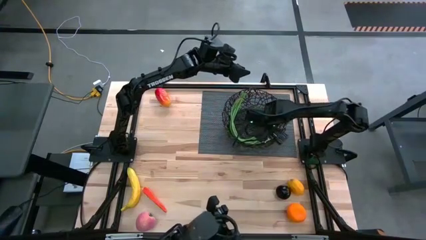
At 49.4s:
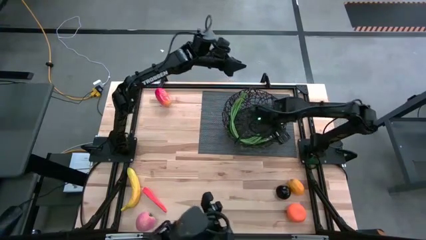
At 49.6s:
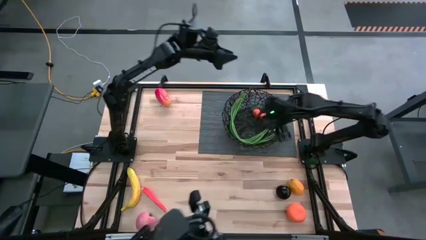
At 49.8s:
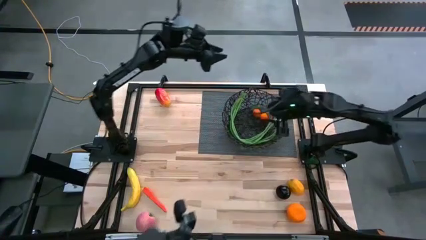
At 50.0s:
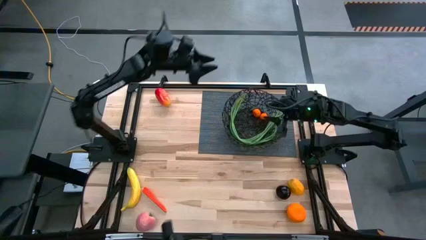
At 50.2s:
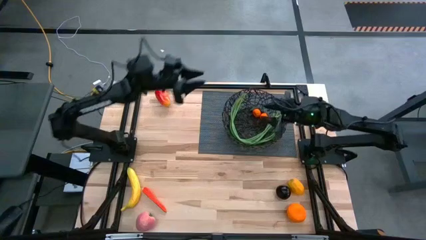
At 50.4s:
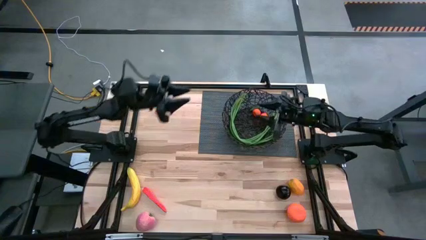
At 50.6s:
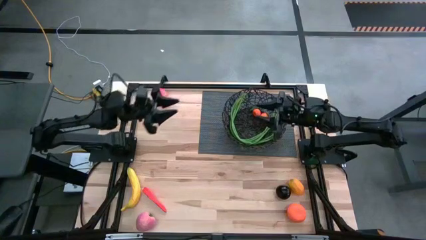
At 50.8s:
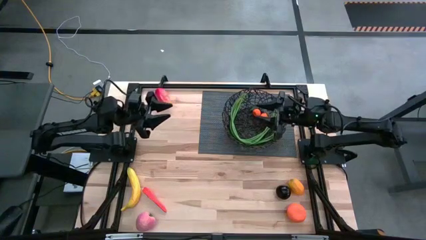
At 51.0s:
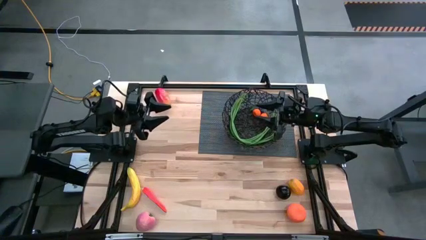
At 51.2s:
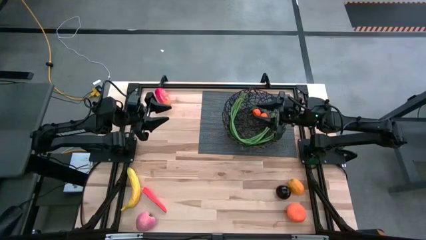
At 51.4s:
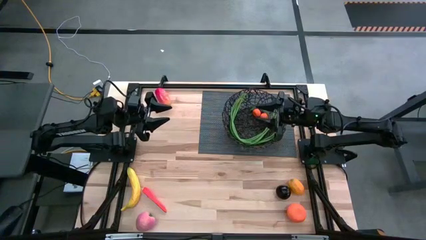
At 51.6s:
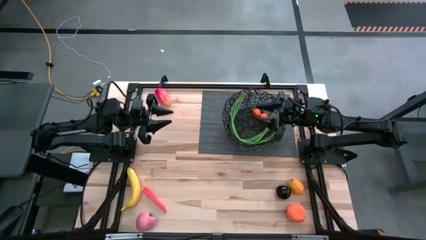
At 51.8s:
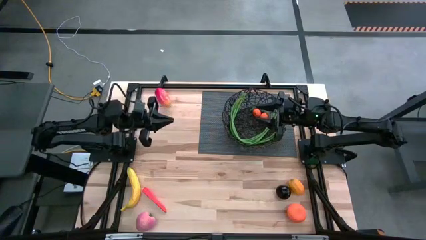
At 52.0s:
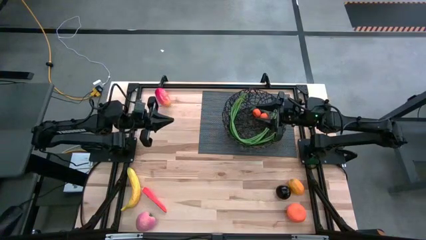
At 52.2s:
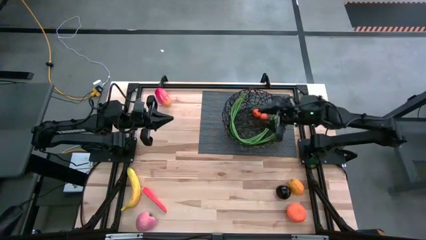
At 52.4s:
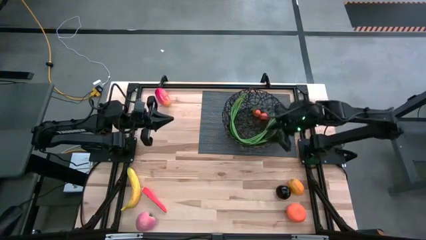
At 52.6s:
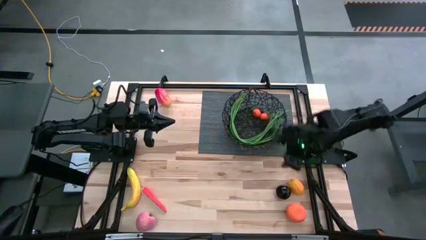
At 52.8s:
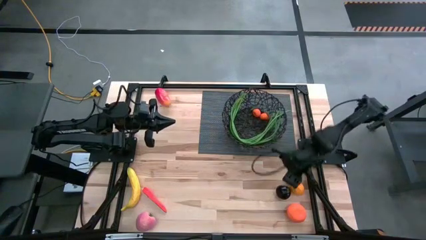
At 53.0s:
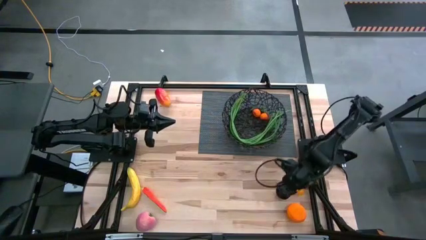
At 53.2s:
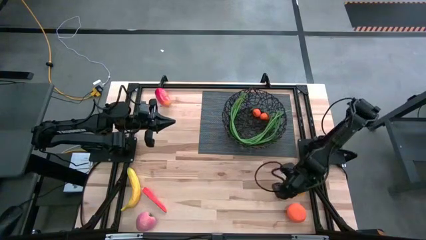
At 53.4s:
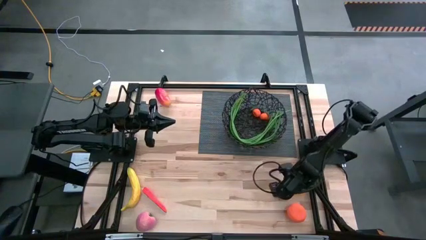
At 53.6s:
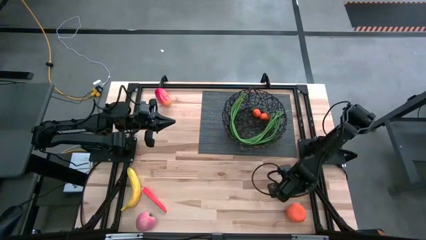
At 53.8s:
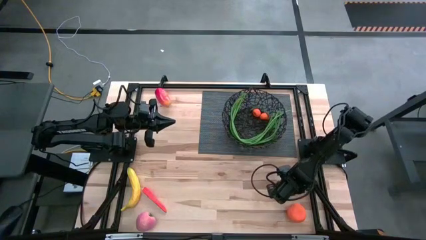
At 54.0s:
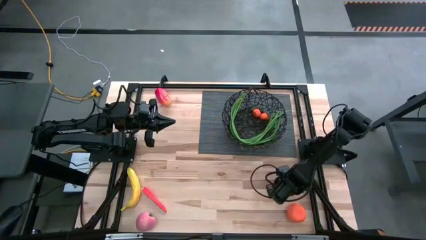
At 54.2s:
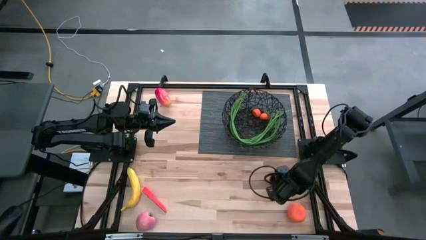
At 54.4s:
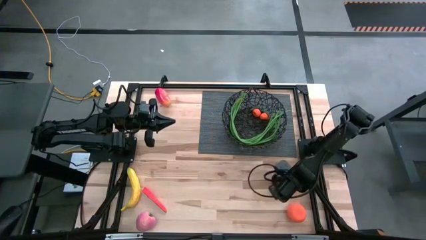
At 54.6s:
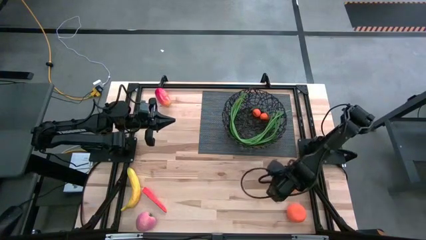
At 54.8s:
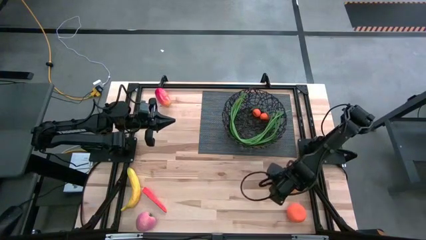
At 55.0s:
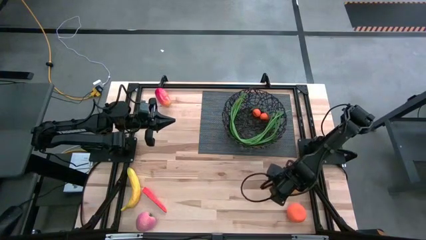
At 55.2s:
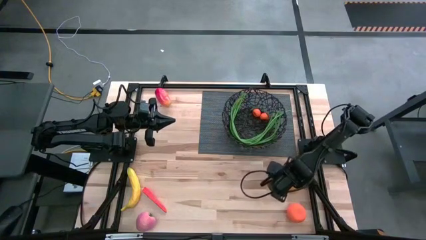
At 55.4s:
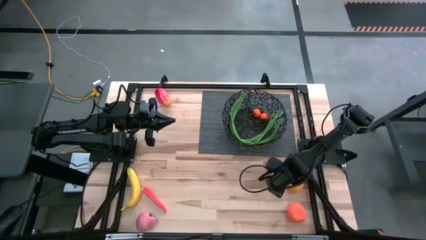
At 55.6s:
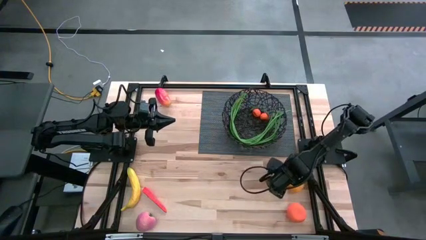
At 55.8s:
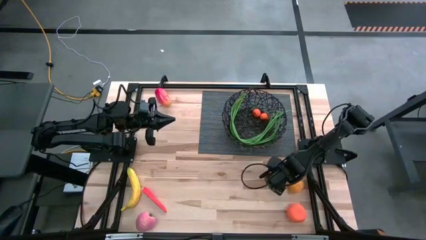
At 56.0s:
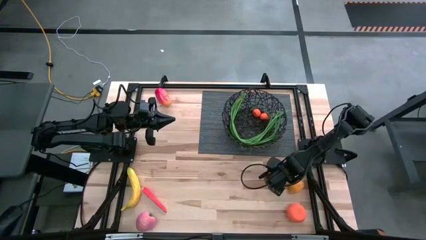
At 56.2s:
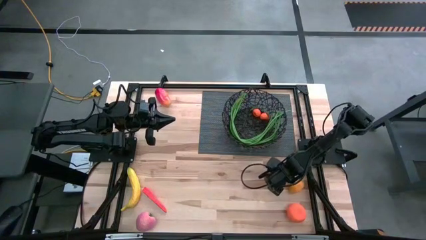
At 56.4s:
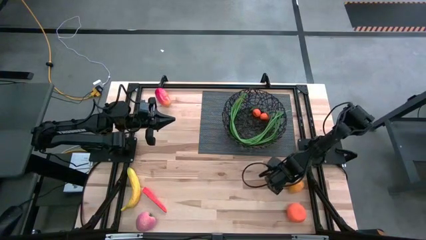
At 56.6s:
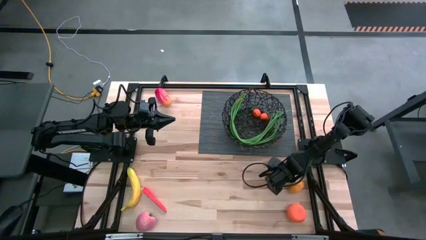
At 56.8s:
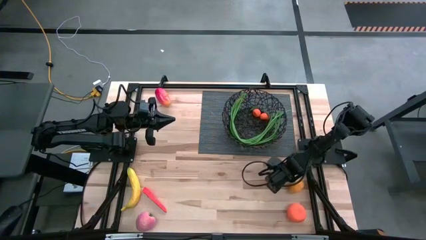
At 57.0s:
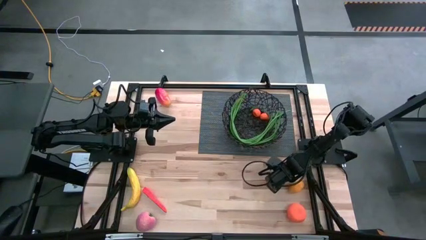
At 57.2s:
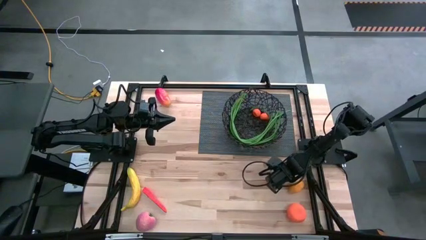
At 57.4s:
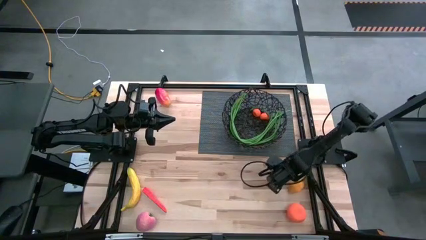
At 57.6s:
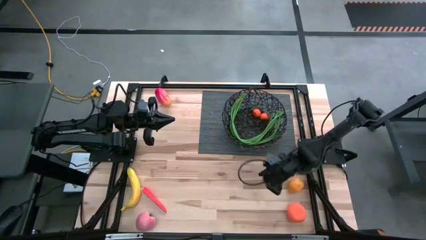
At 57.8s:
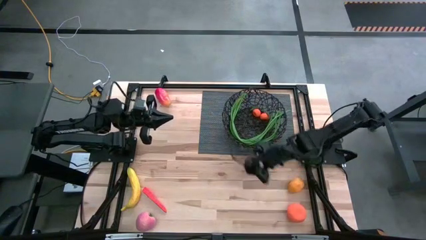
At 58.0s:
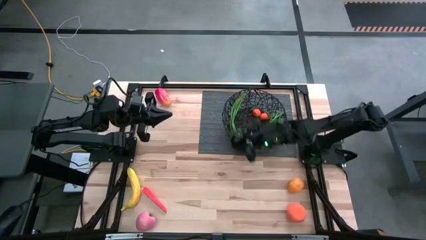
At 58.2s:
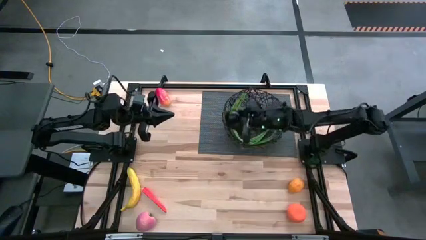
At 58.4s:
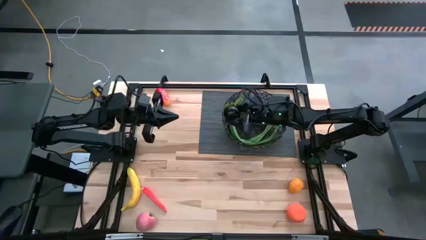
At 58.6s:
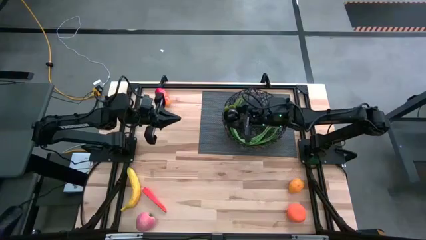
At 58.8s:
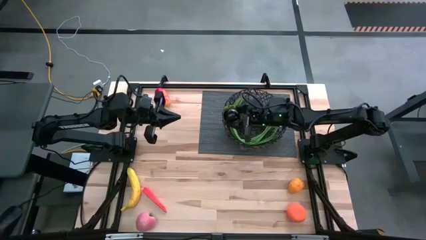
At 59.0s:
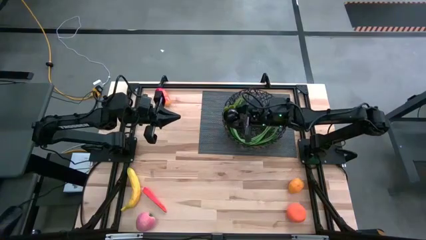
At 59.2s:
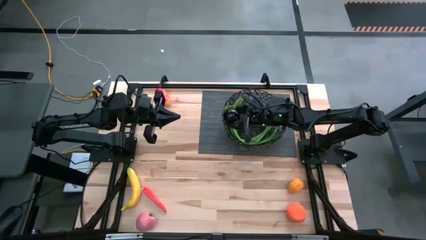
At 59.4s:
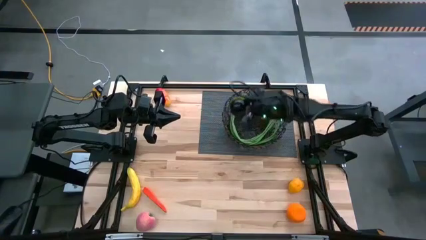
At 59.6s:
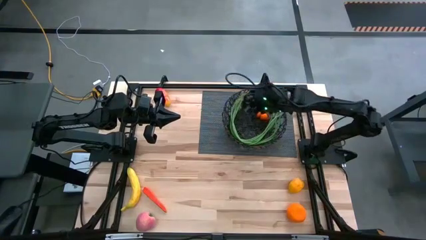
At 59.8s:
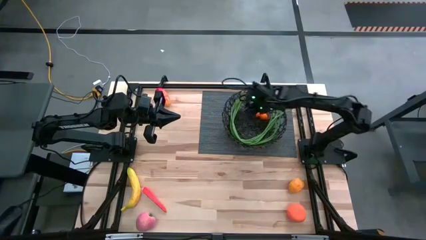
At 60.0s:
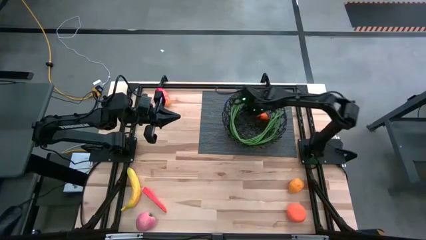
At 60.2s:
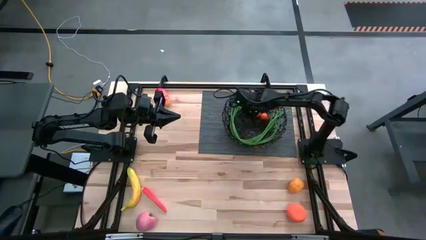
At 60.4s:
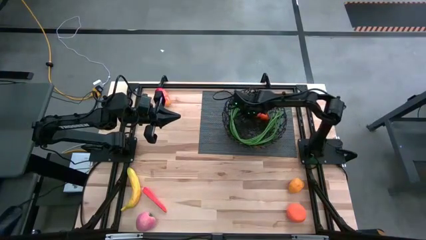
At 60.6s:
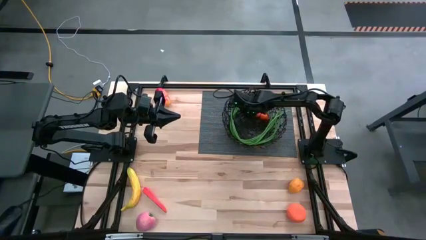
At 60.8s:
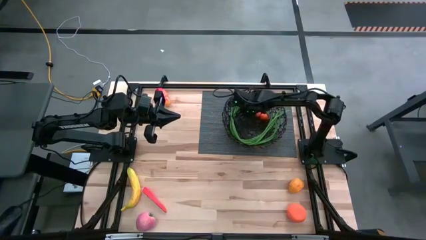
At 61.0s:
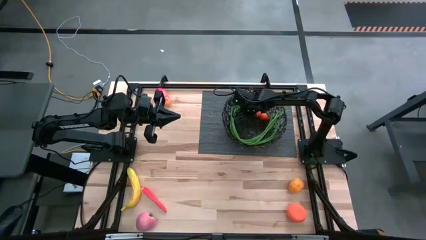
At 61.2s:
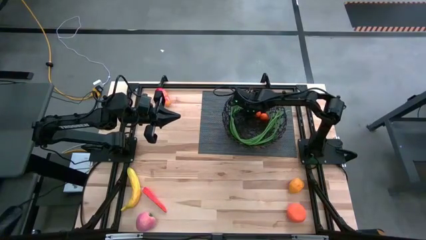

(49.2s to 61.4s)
Task: Build produce basket
Put the mangosteen into the wire basket

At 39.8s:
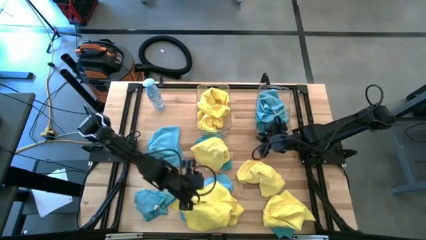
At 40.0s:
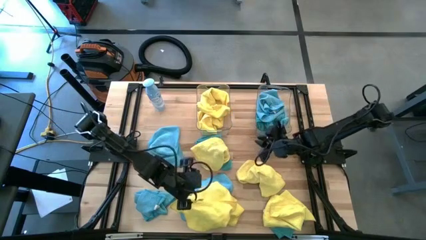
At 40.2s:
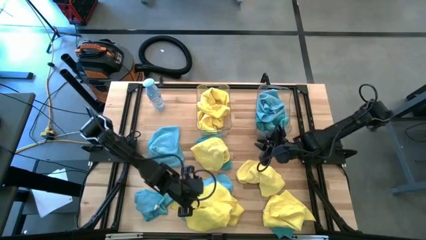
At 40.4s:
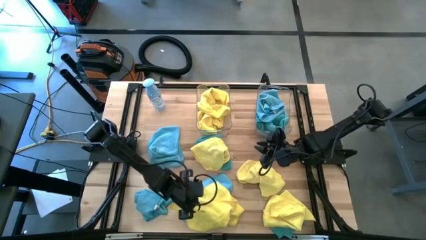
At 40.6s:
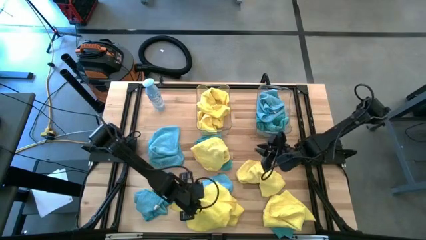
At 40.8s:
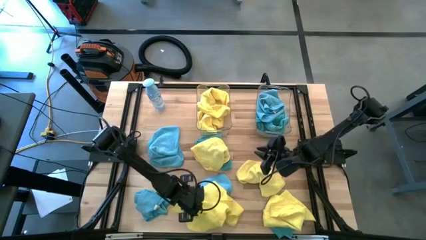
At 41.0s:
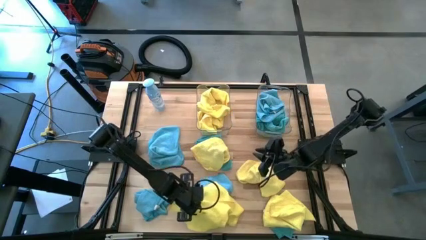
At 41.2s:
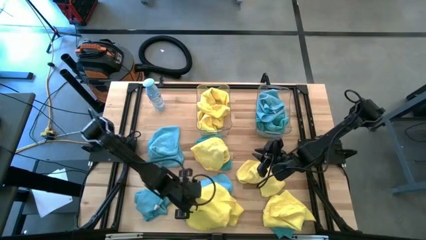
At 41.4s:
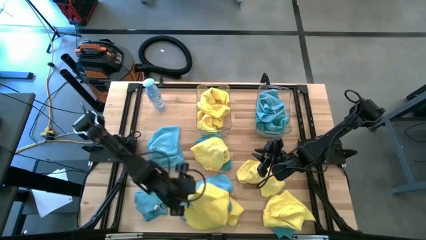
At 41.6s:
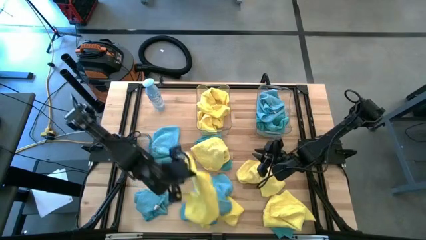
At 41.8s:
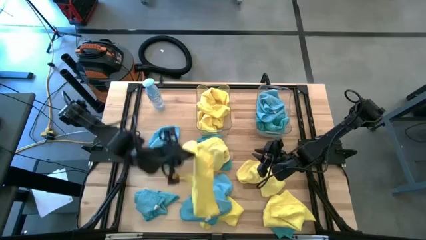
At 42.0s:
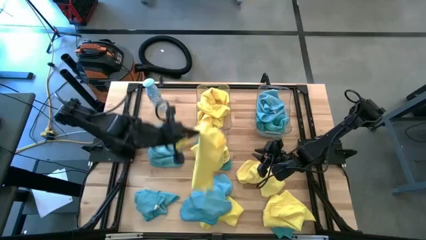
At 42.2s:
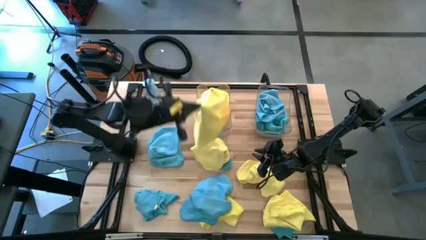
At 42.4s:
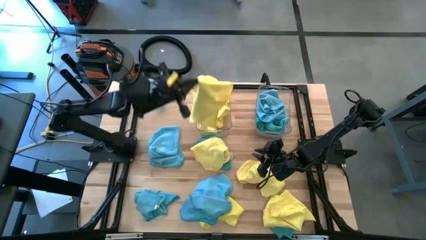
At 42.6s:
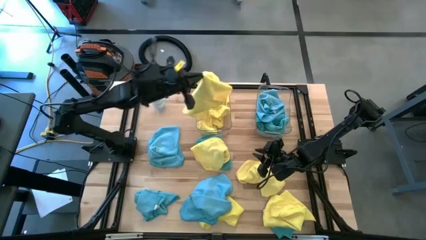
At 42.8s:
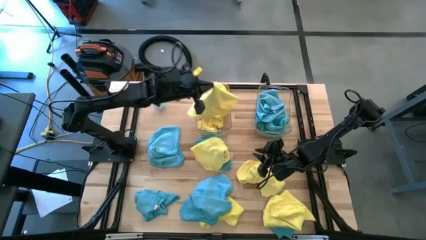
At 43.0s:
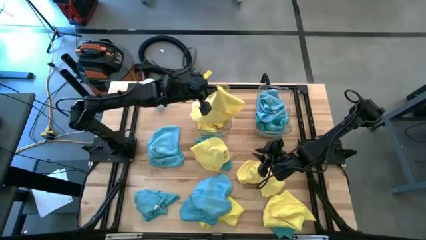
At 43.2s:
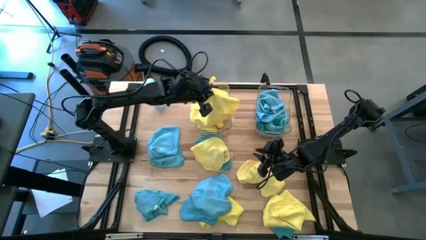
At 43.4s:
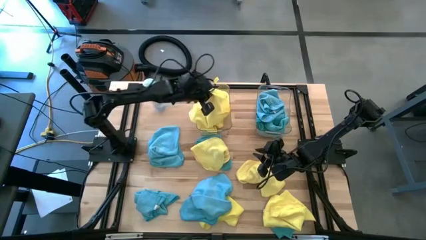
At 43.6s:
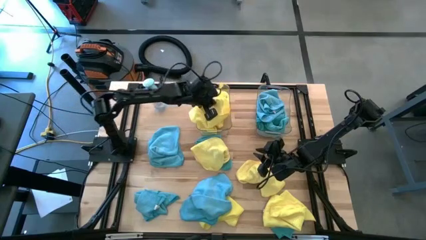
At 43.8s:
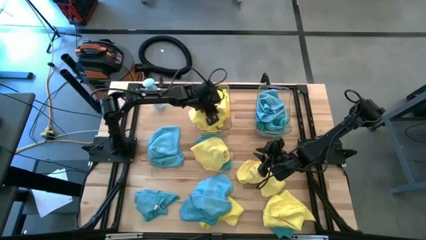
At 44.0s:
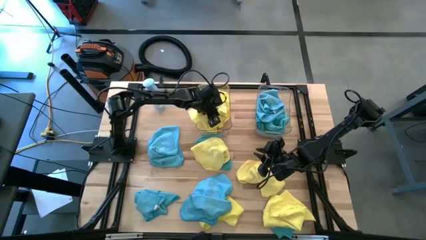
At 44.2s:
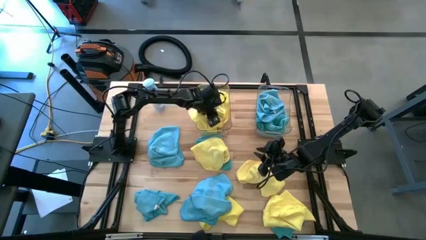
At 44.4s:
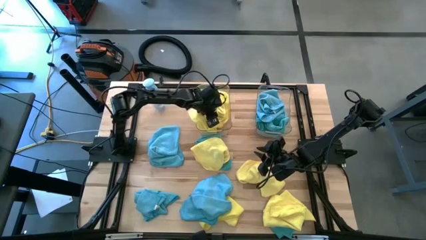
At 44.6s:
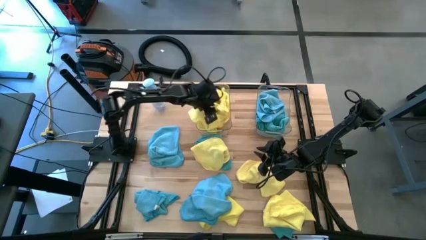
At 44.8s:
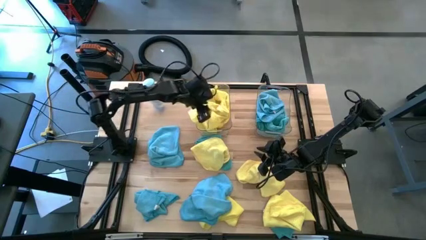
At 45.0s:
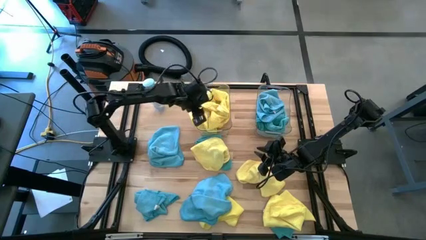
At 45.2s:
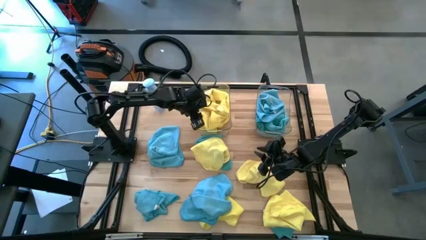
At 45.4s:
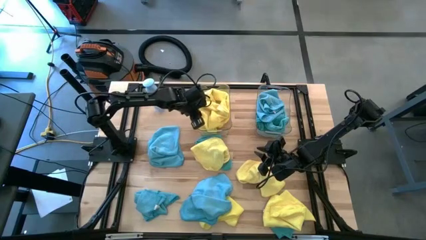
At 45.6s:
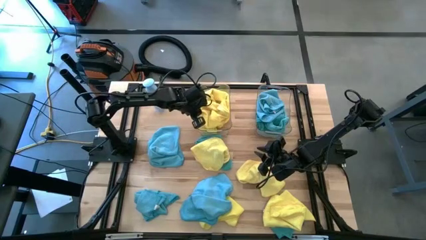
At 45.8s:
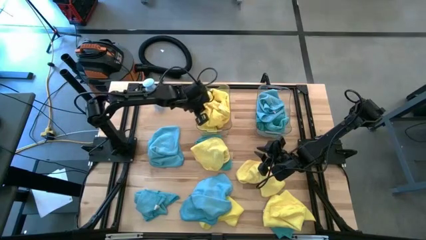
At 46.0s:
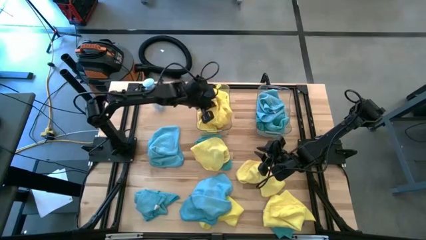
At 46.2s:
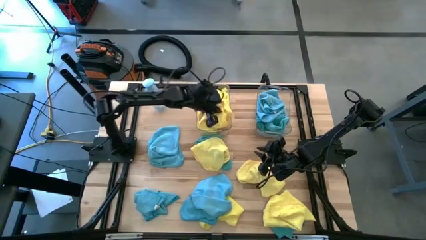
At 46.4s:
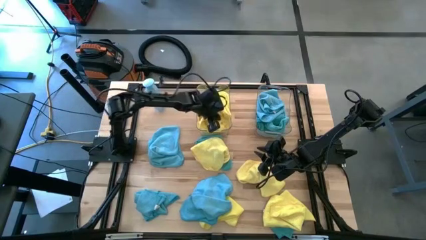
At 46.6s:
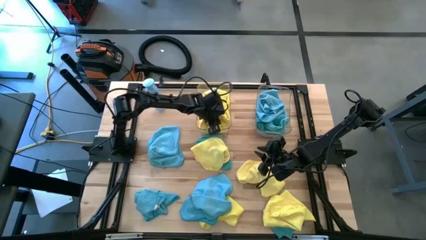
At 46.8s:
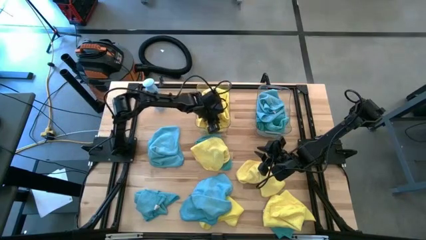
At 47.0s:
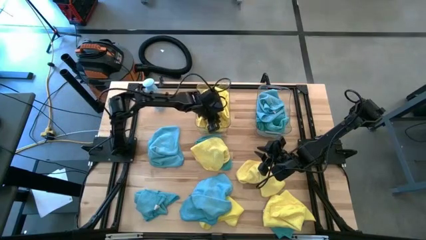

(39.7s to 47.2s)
Task: Sort microfiber towel by color & place in baskets
Put the yellow towel into the left transparent bin
